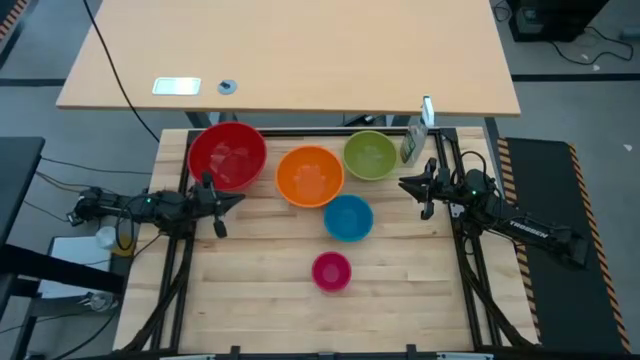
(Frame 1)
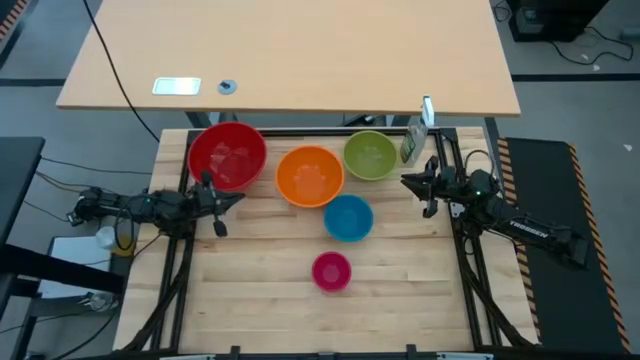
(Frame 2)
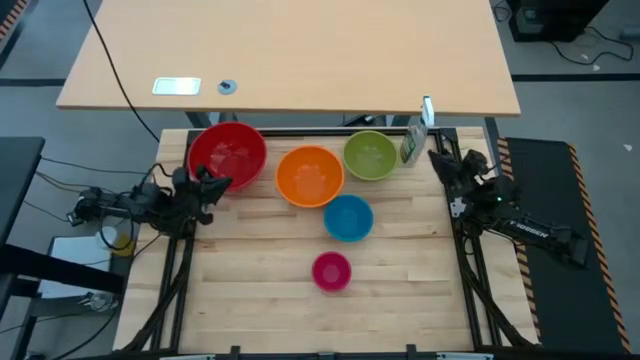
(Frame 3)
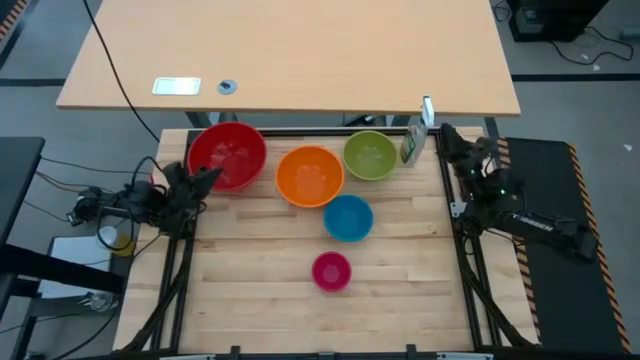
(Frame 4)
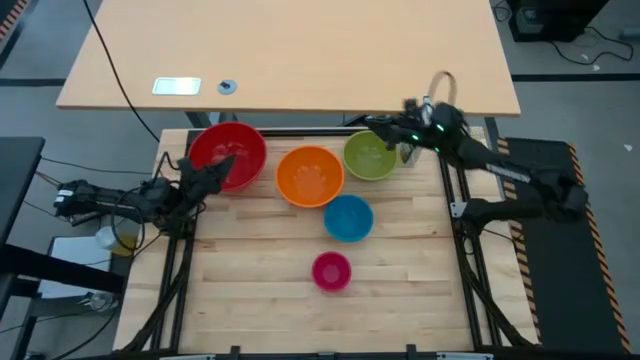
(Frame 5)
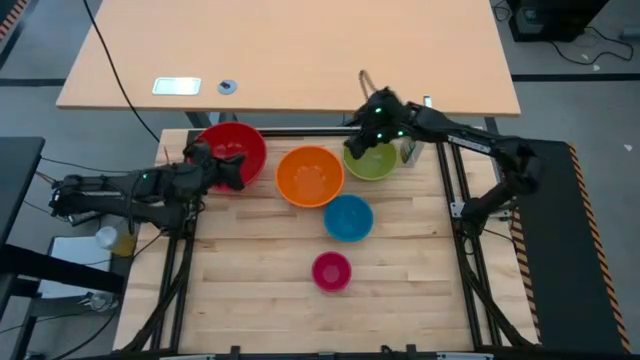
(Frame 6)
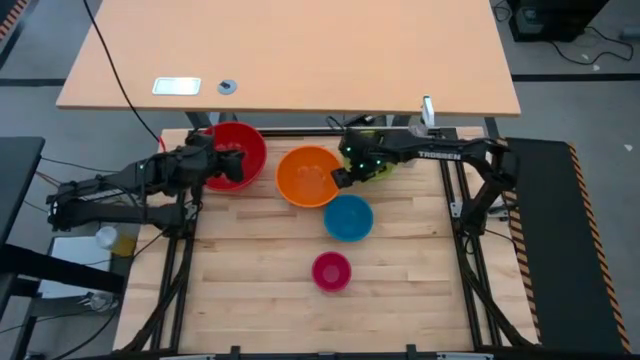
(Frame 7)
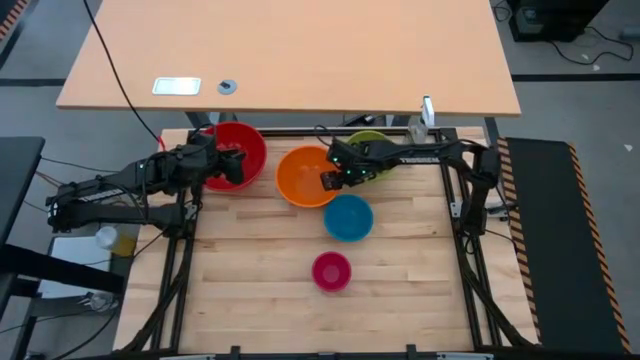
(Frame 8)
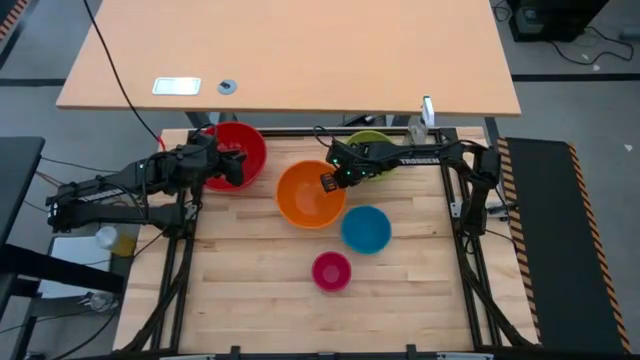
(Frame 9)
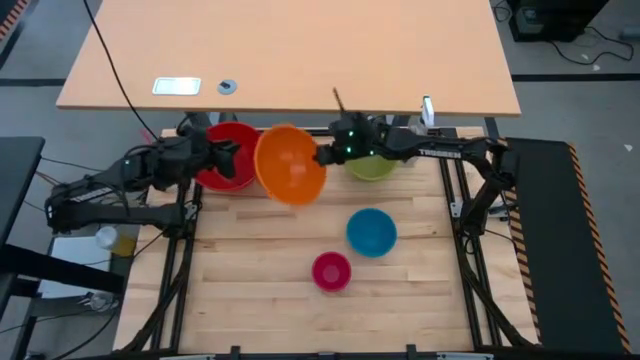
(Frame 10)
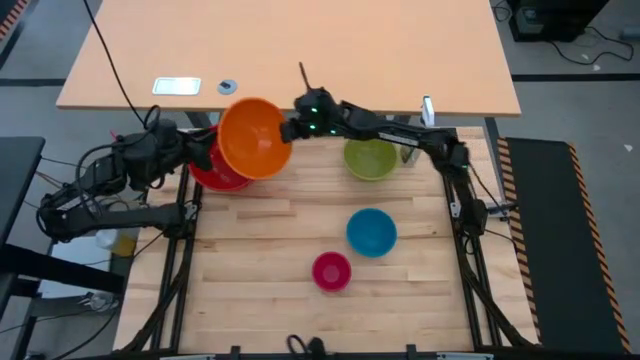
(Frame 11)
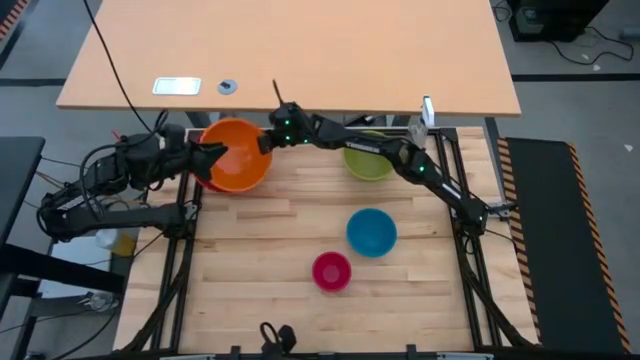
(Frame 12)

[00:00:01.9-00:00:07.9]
Stack the orange bowl on top of the red bowl

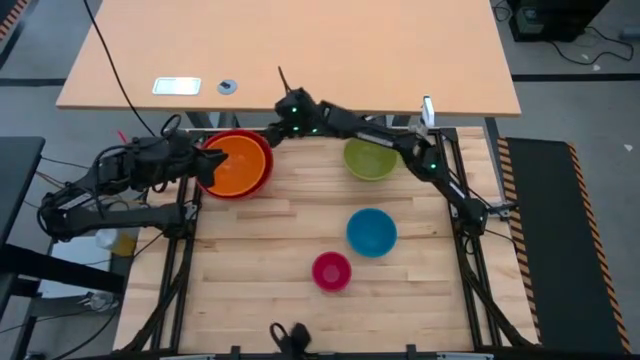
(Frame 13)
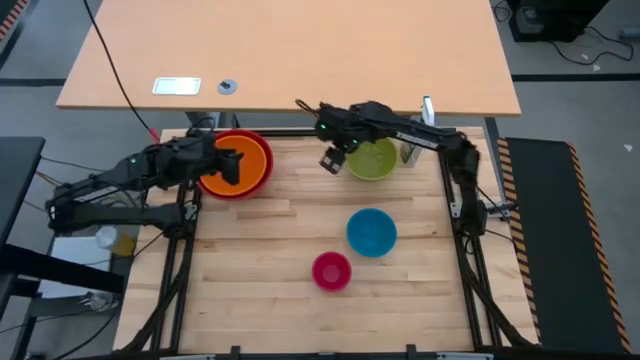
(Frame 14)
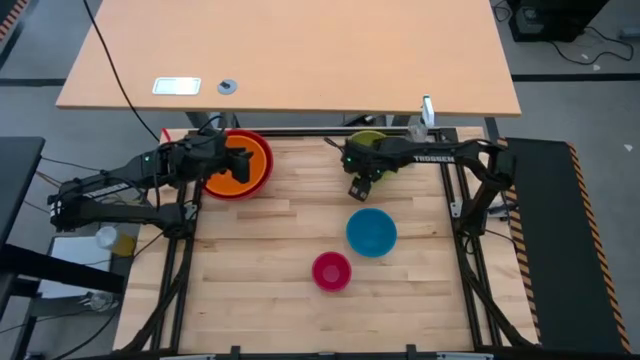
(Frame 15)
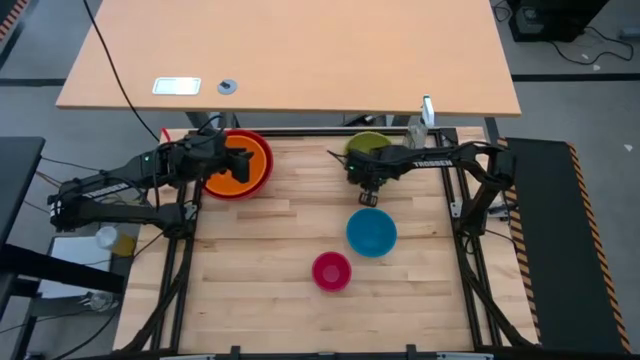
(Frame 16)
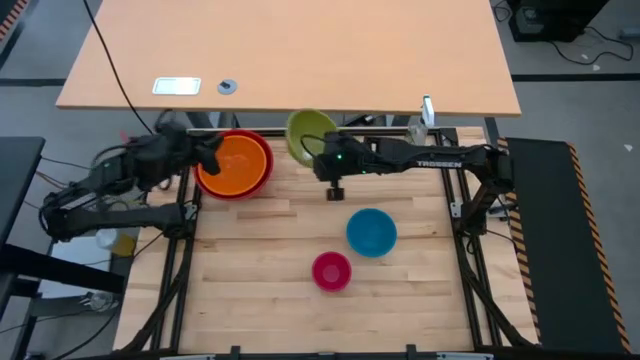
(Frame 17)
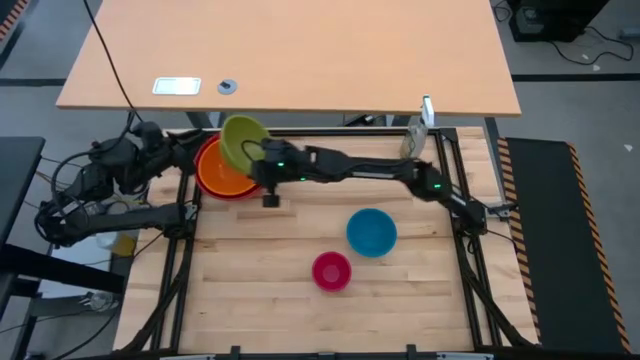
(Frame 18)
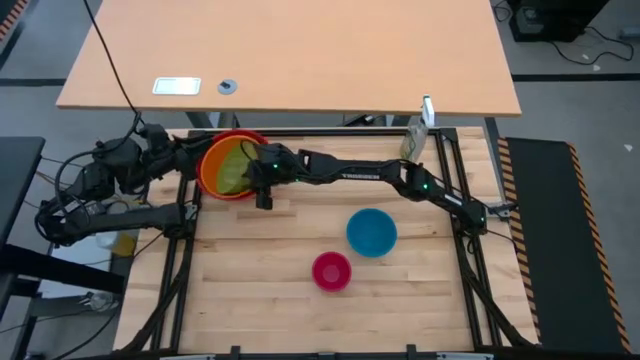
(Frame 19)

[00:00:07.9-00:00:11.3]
Stack the green bowl on top of the orange bowl

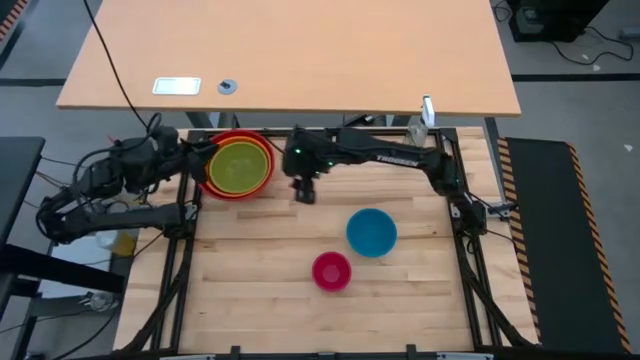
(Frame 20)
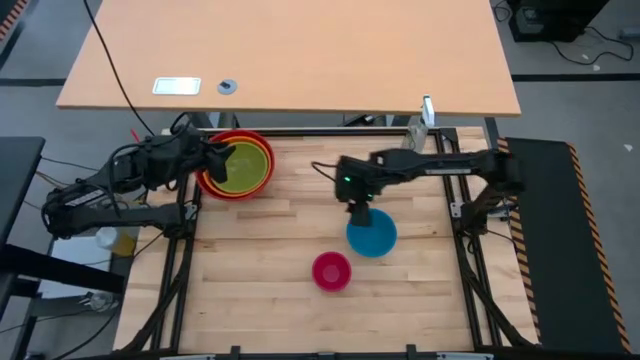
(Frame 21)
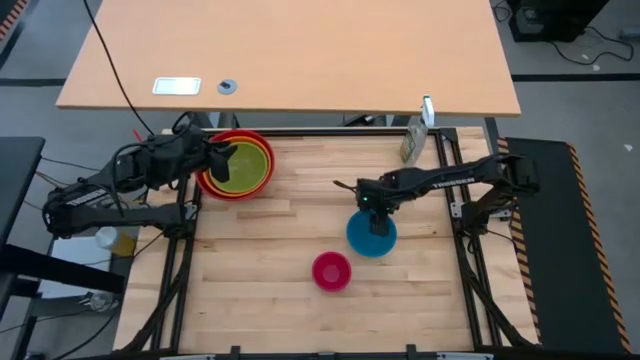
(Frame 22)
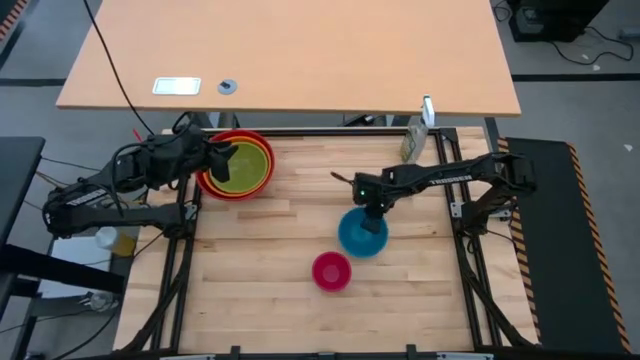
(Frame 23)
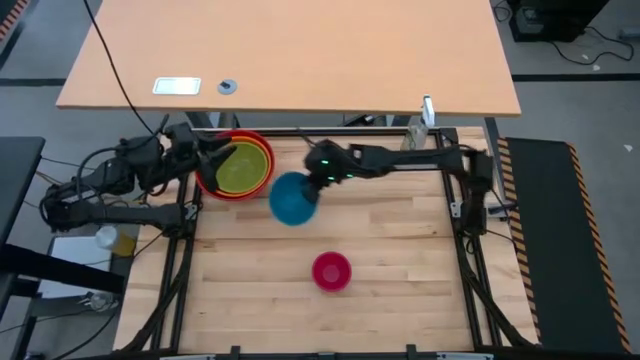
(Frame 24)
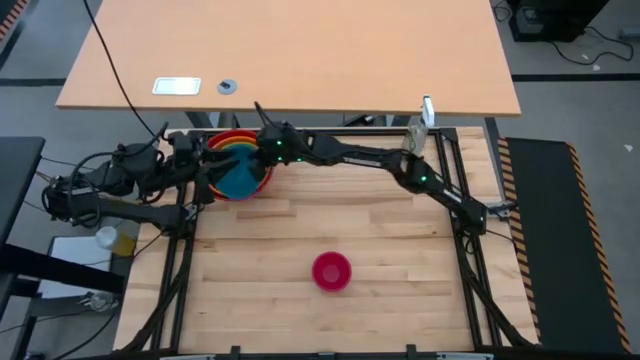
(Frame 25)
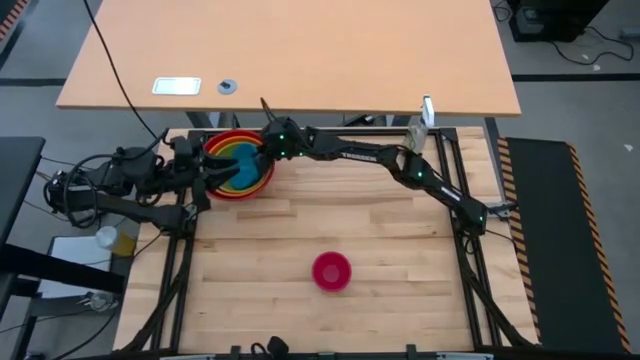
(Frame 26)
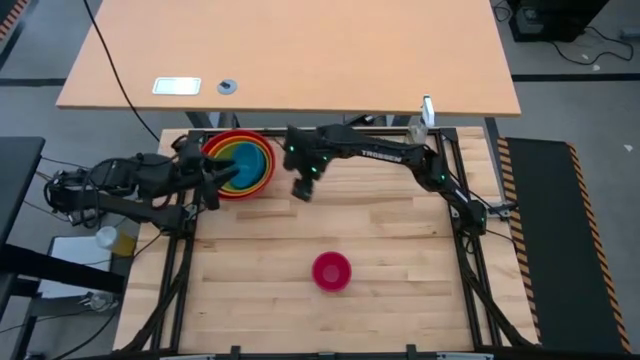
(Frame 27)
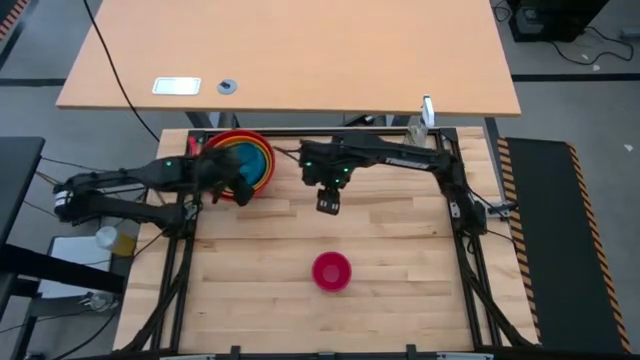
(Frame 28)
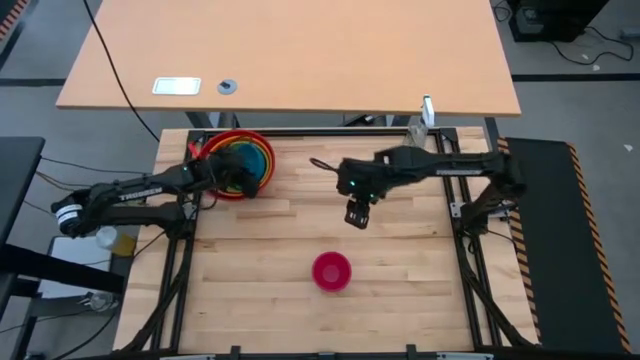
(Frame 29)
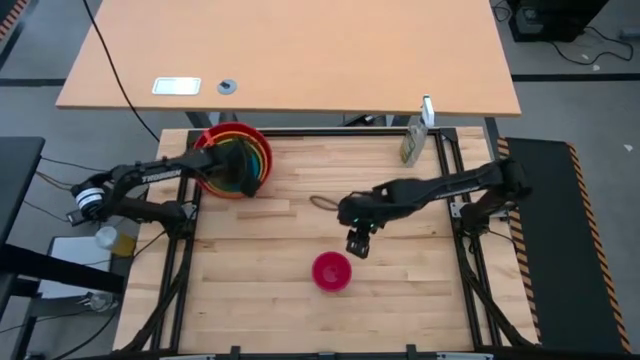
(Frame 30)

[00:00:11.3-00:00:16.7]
Stack the blue bowl on top of the green bowl

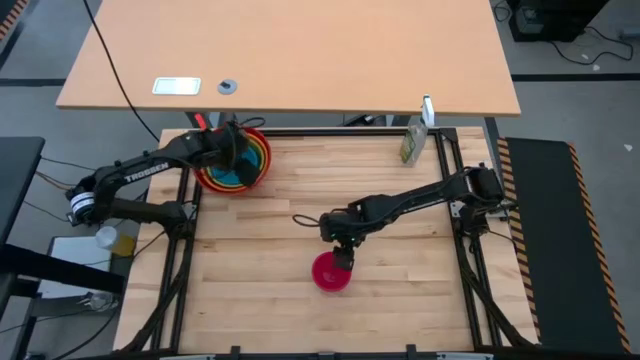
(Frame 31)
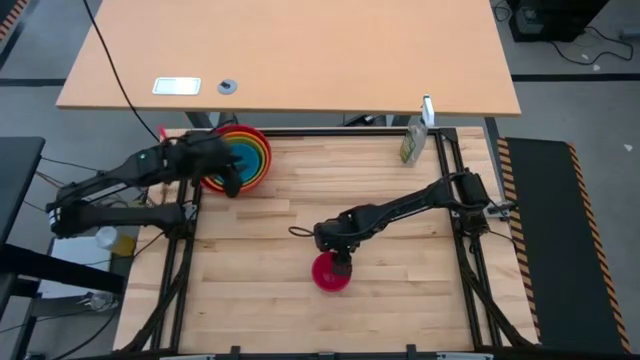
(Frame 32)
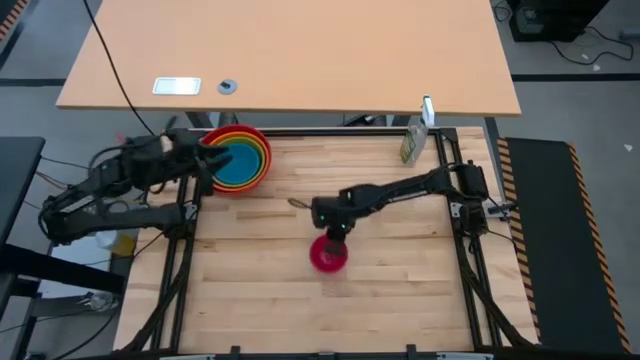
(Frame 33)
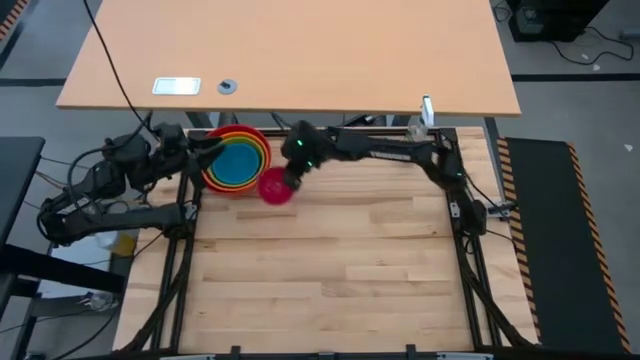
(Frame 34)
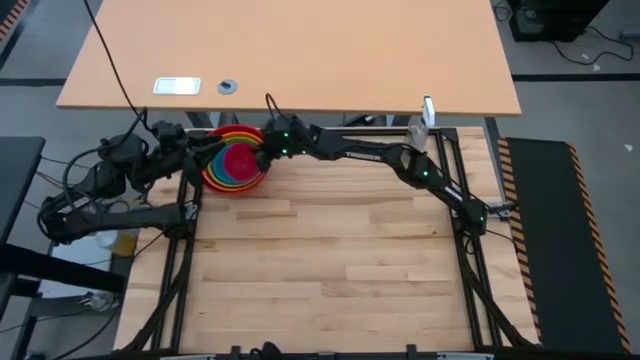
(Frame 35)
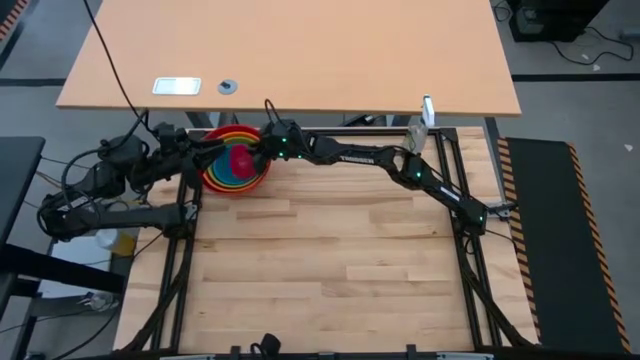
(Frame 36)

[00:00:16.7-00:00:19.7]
Stack the pink bowl on top of the blue bowl

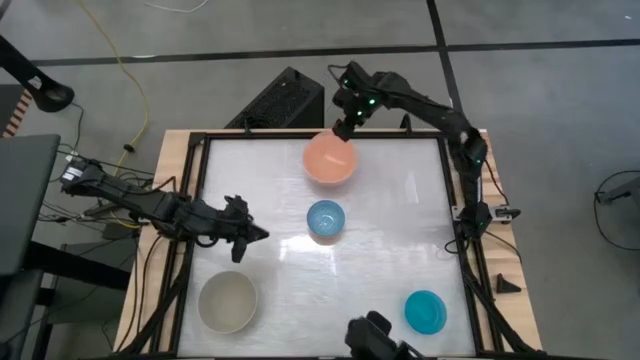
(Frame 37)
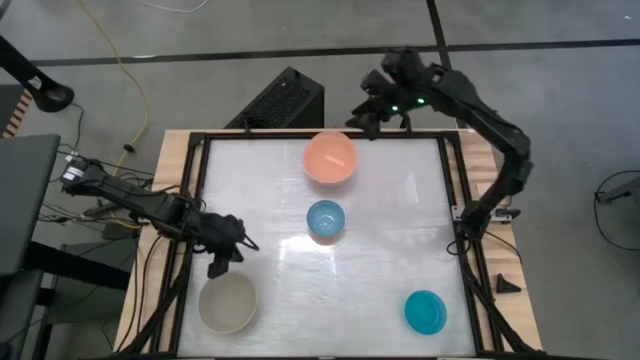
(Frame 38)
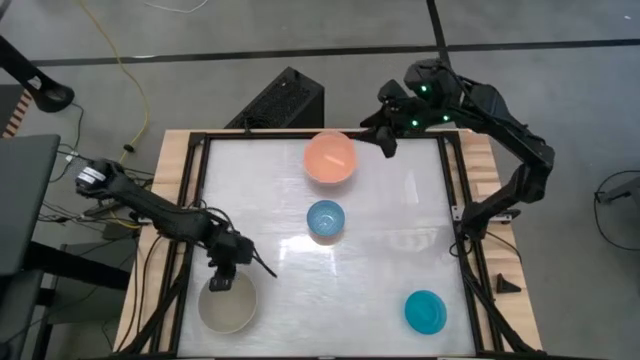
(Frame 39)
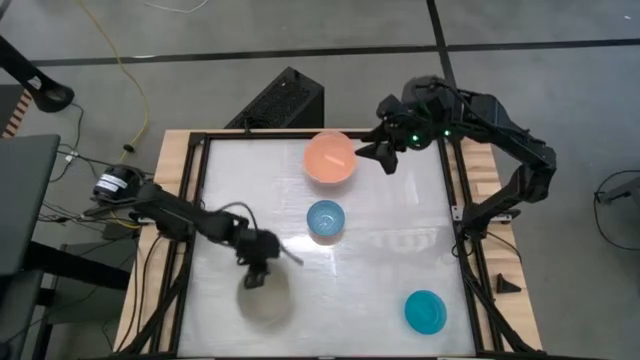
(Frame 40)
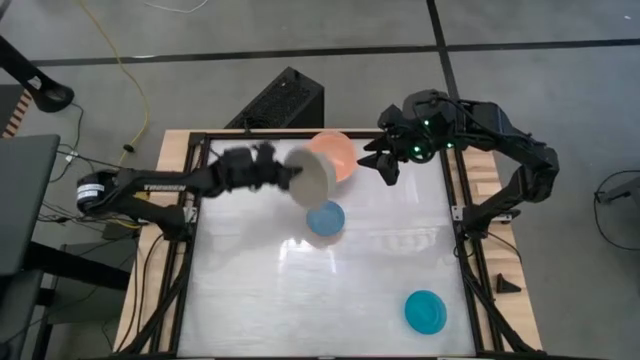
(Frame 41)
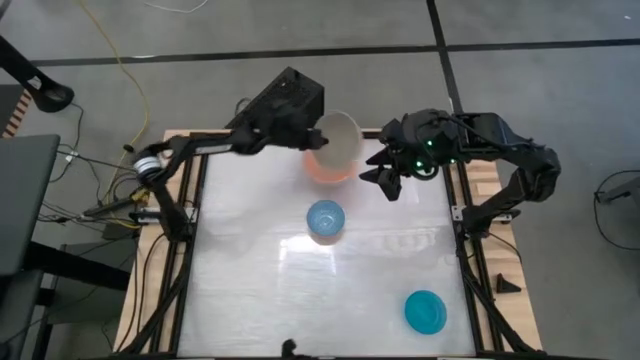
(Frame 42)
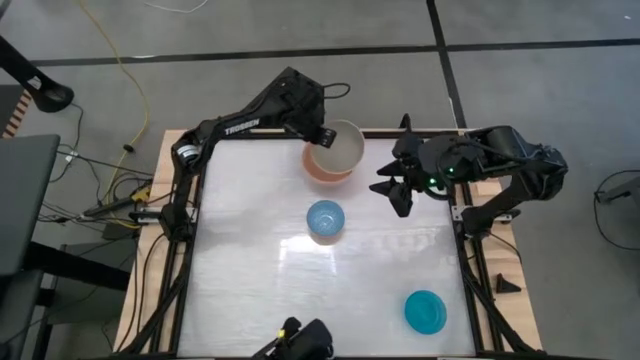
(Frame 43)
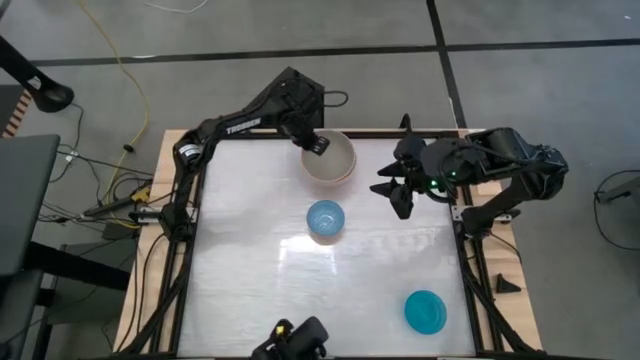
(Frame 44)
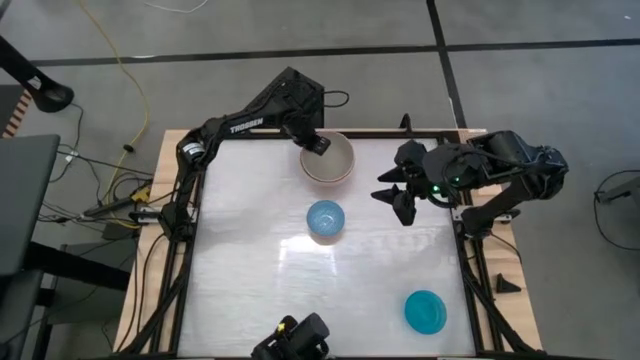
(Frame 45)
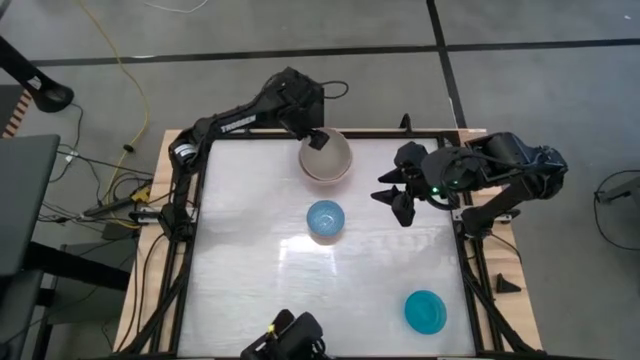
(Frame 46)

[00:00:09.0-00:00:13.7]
Stack the gray bowl on top of the orange bowl
